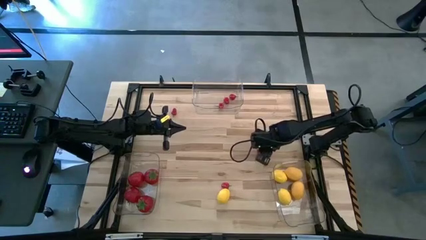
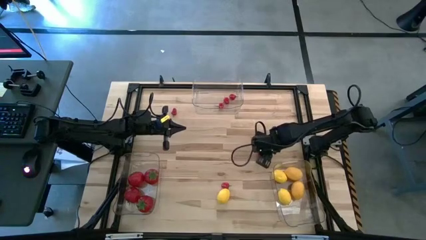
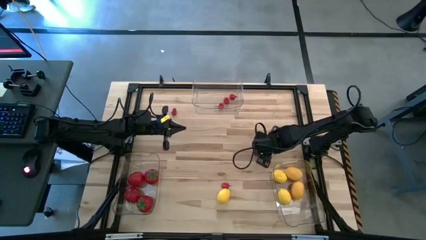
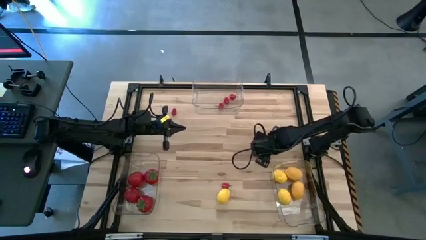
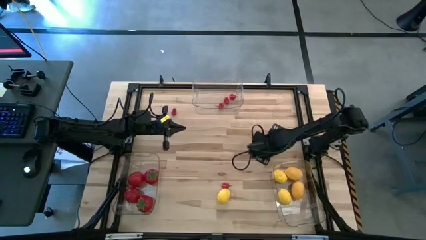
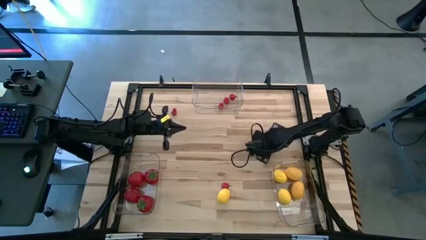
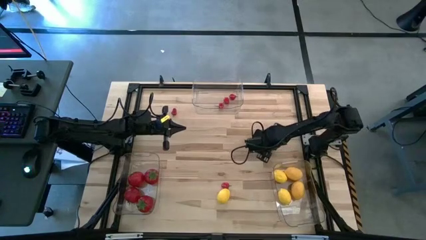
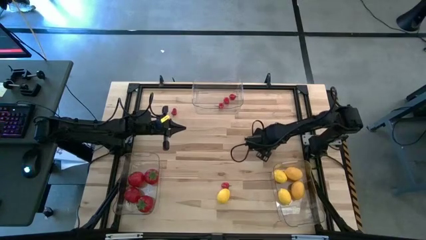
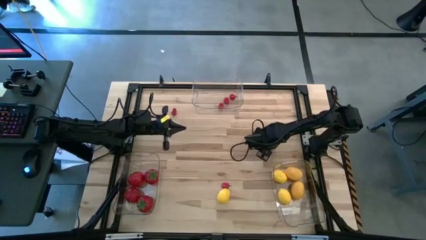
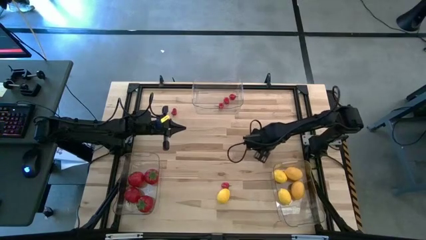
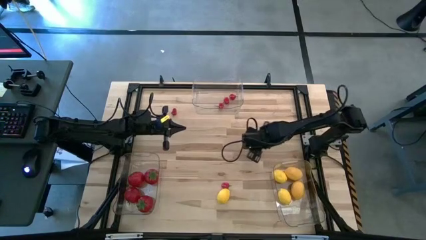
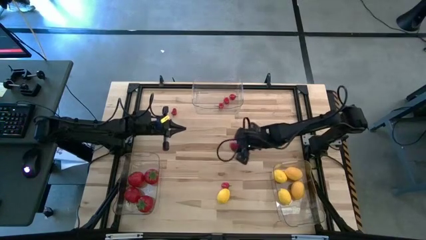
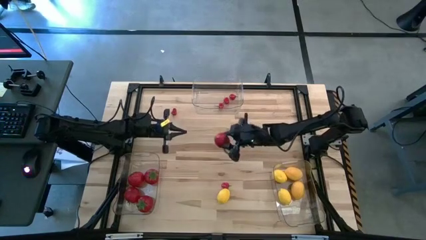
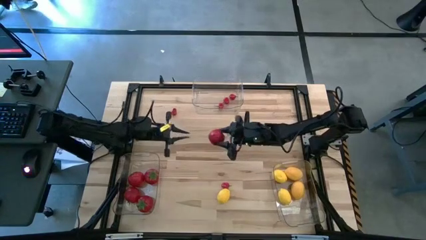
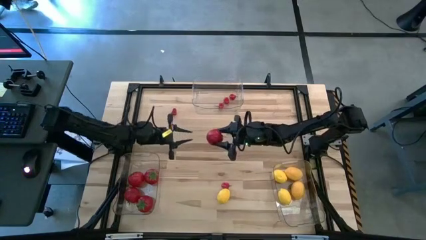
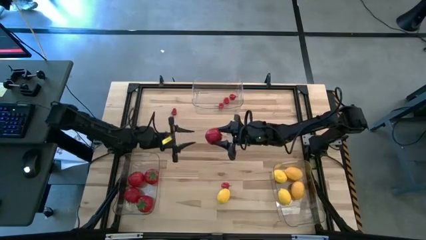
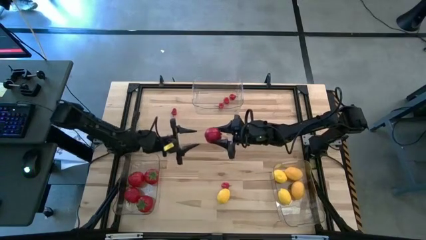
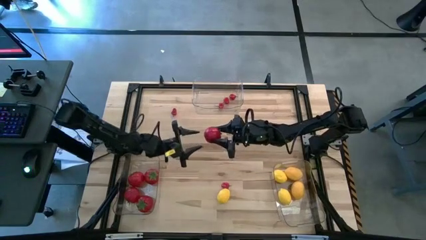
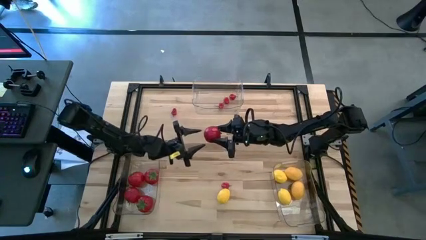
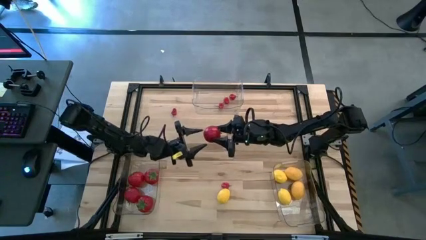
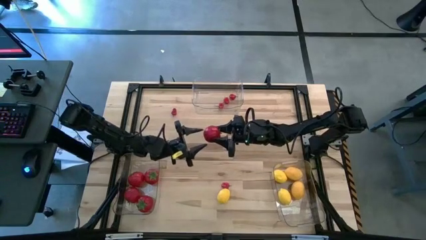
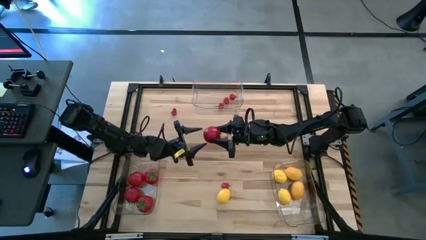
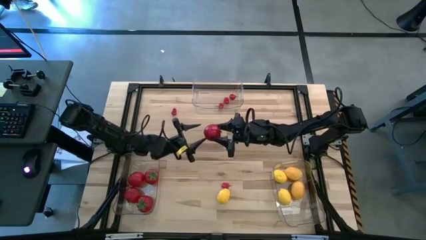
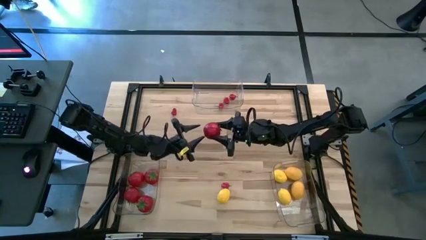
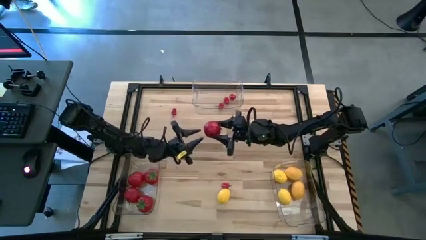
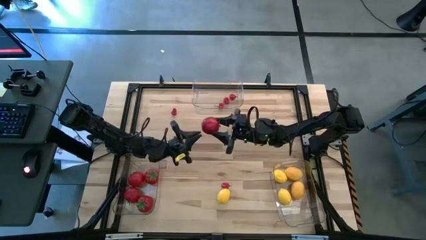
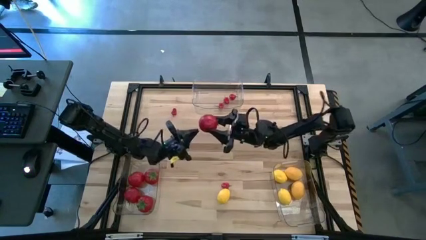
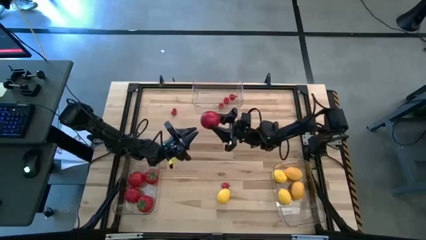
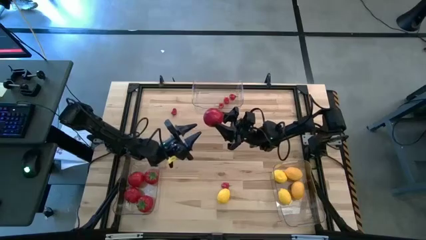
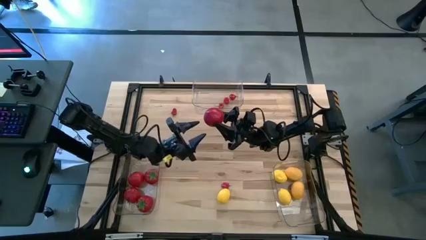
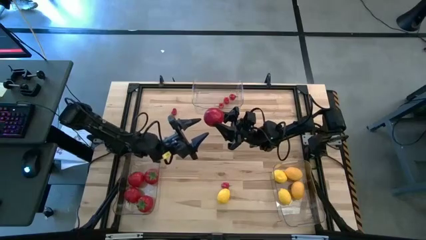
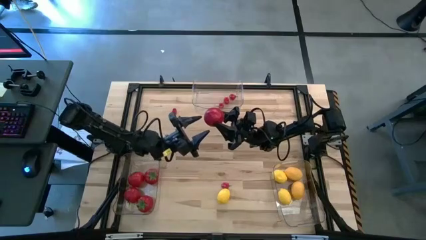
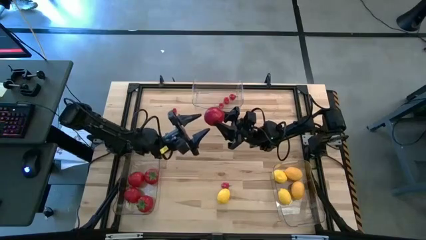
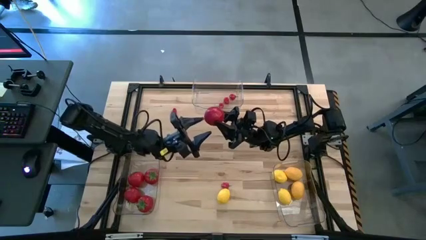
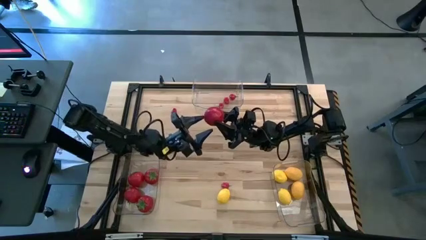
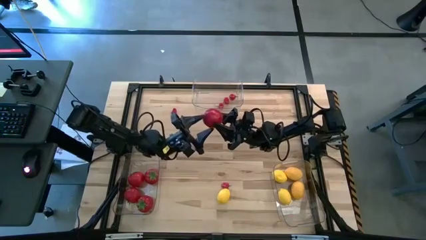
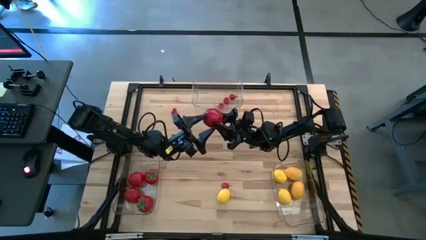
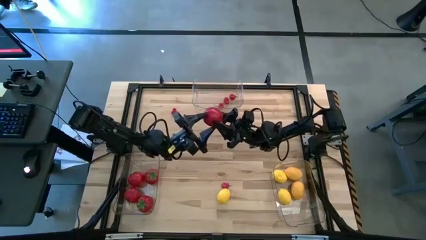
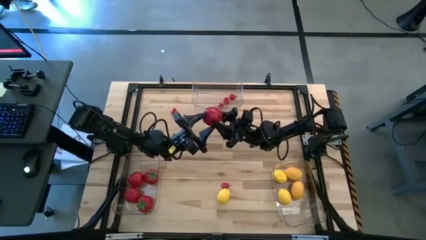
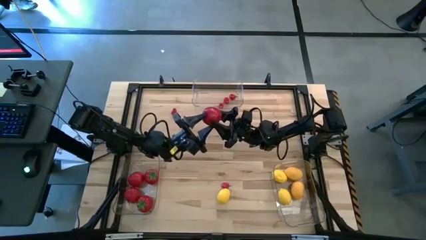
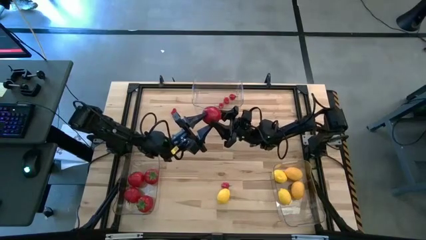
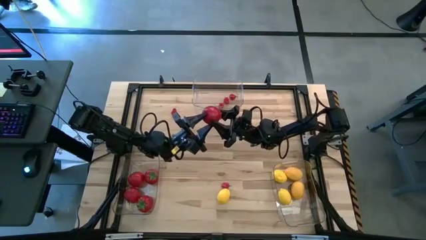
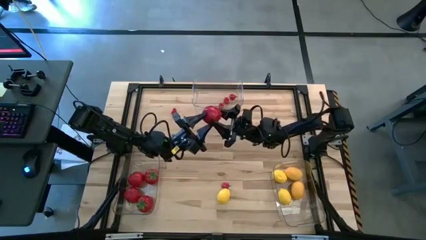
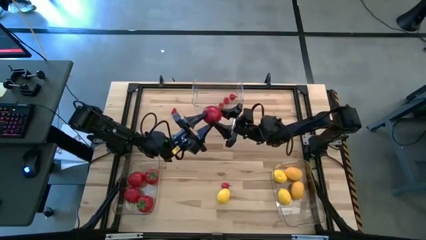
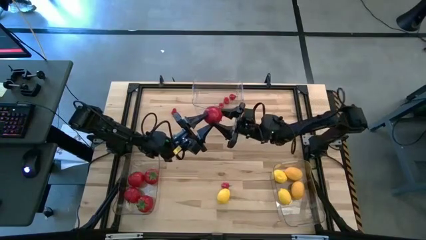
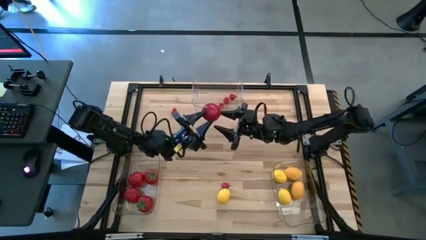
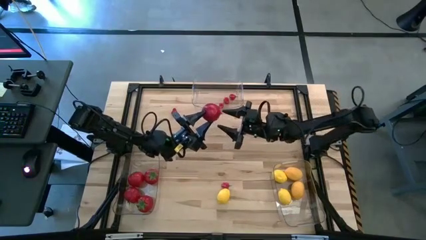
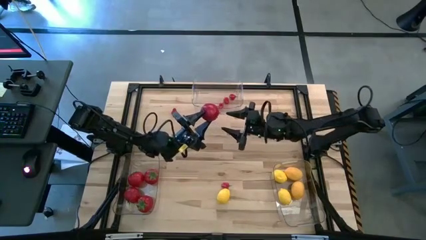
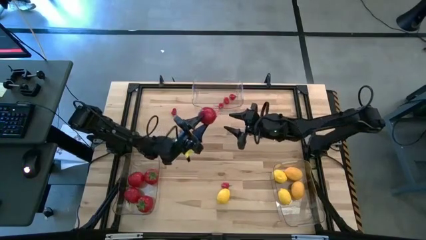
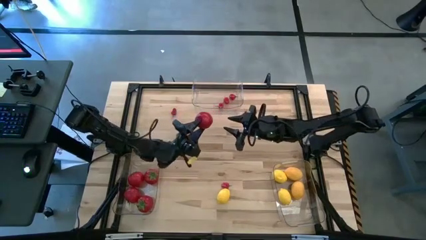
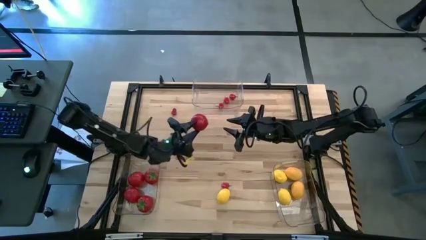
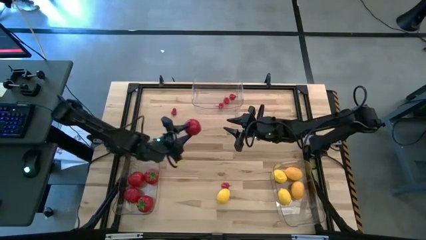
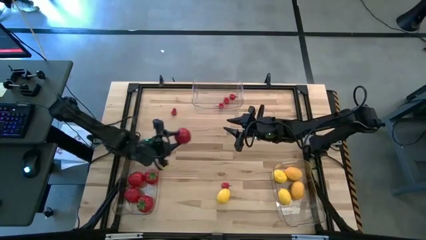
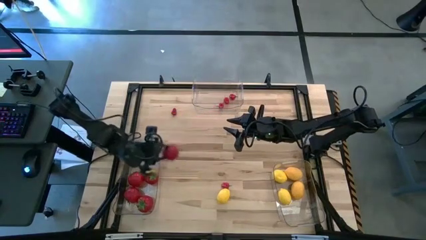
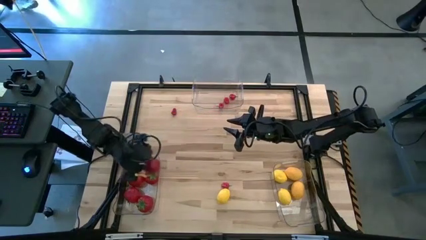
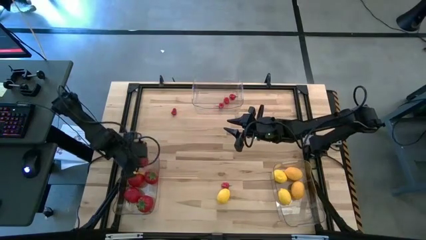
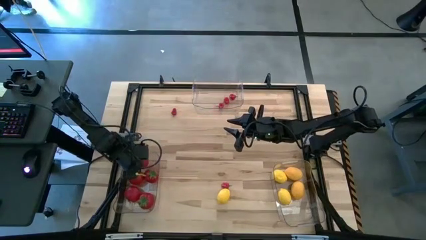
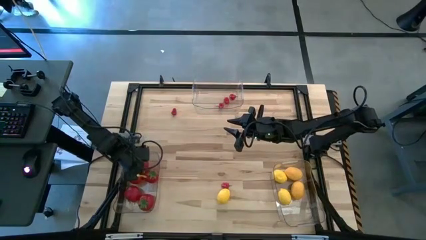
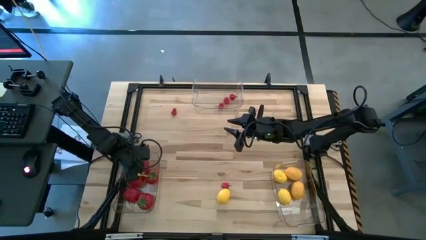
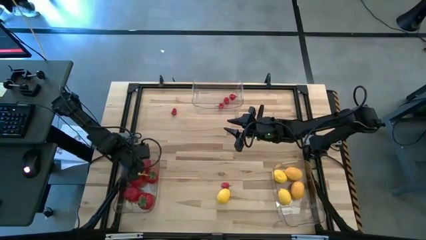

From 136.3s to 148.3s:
Task: Sort produce into baskets
Put the red tomato into the bottom left transparent bin

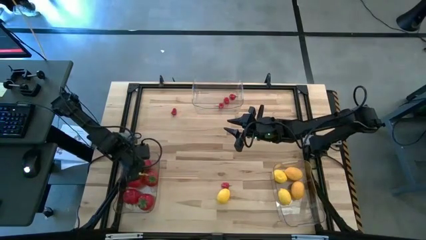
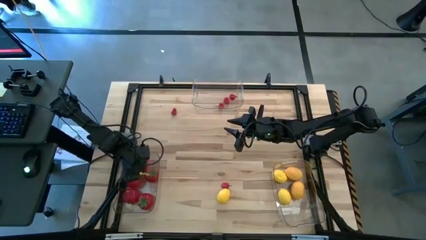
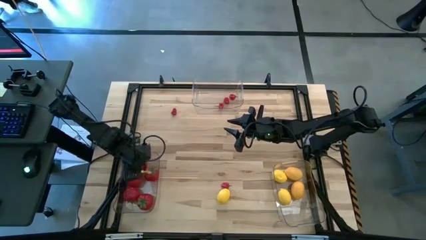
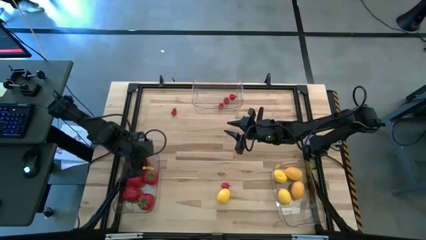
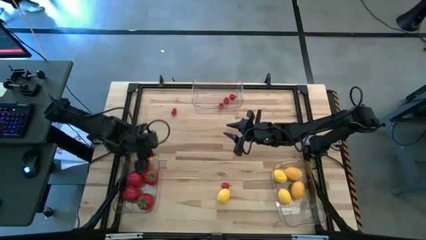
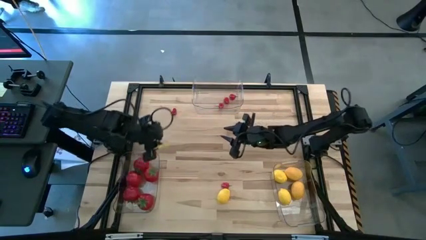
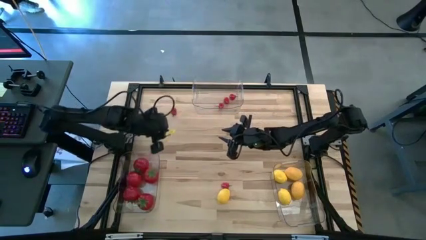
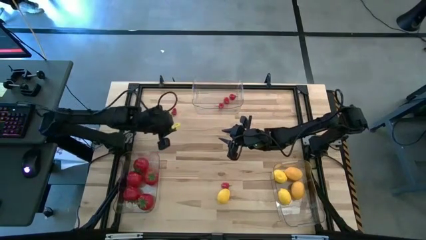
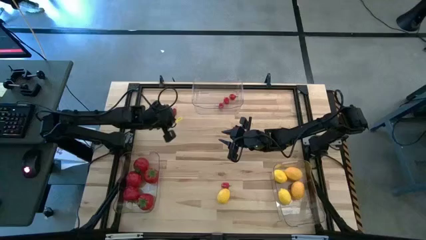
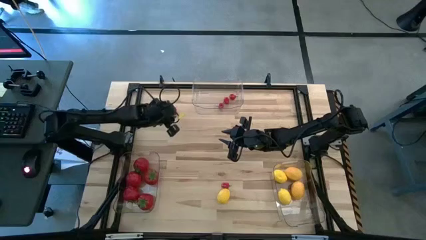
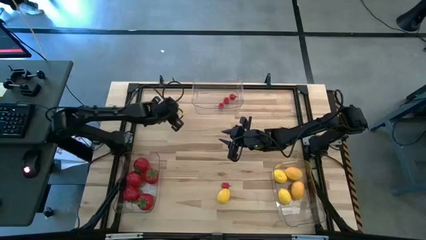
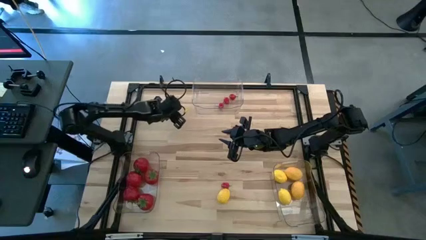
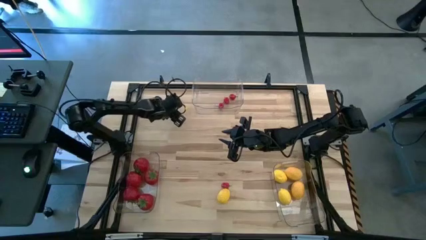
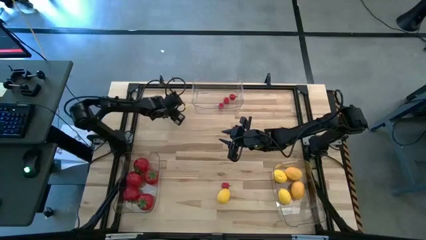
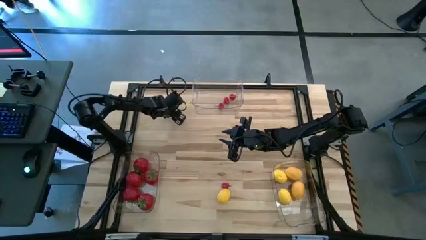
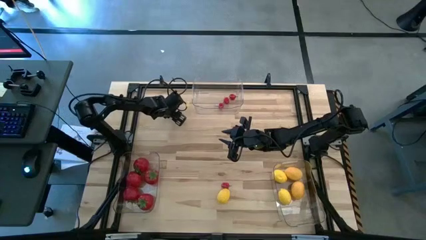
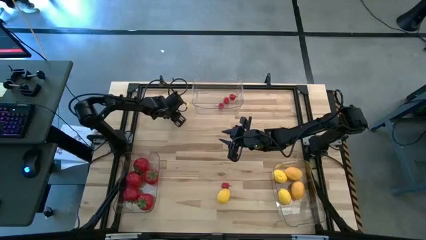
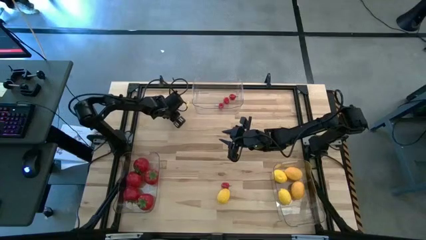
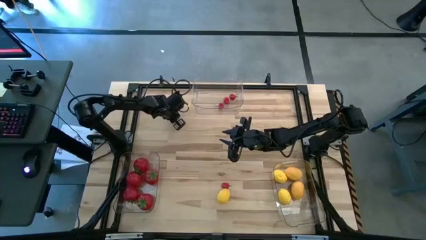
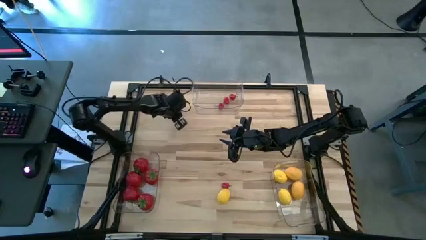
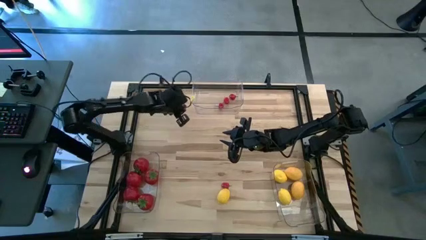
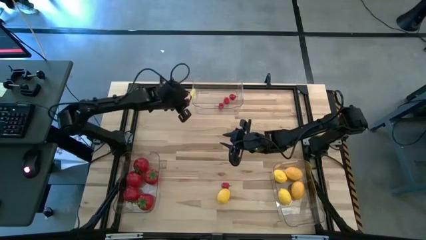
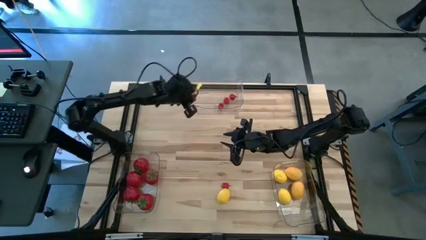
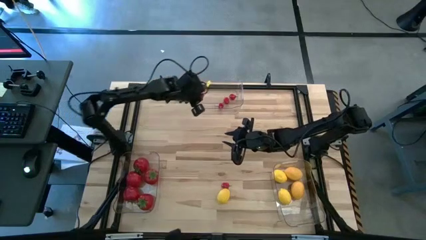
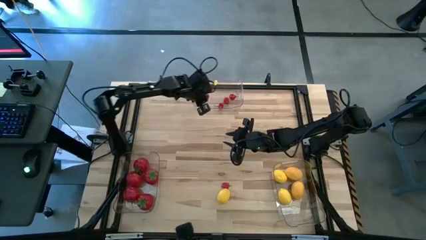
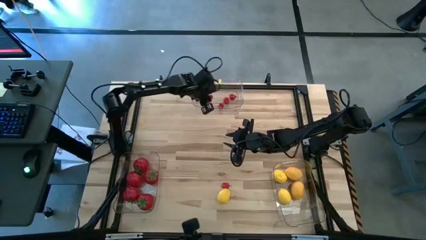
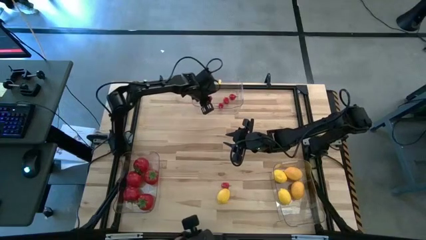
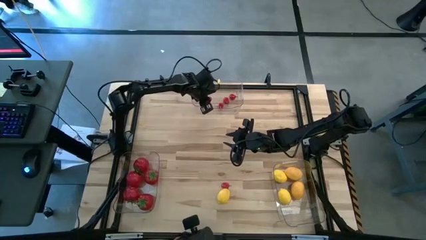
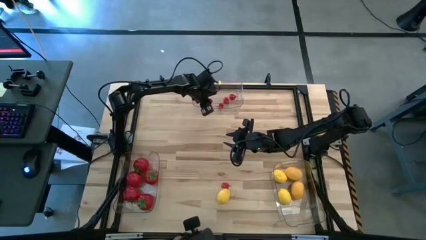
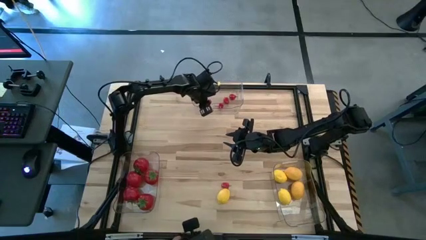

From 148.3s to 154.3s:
Put the red chili pepper into the top center transparent bin
